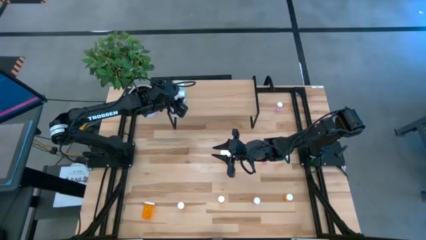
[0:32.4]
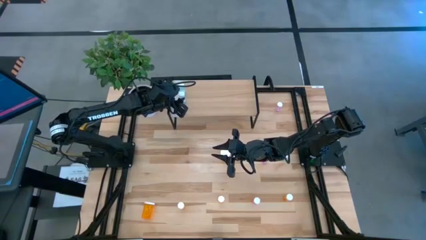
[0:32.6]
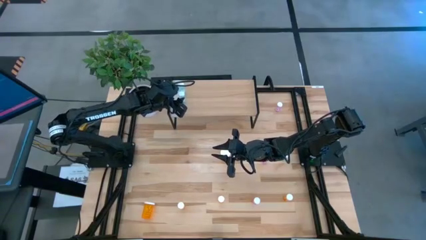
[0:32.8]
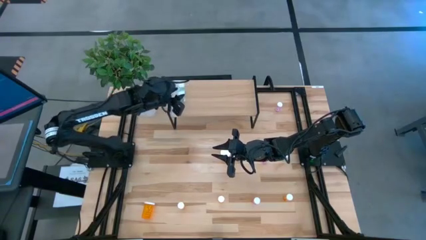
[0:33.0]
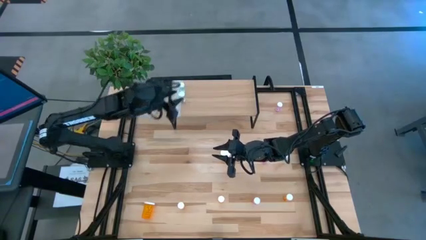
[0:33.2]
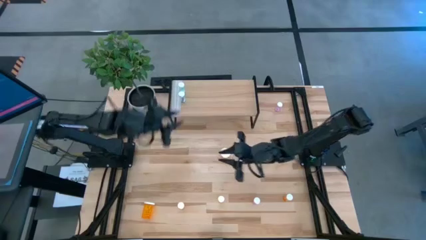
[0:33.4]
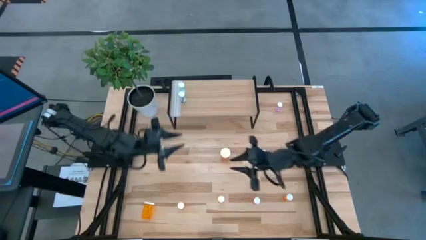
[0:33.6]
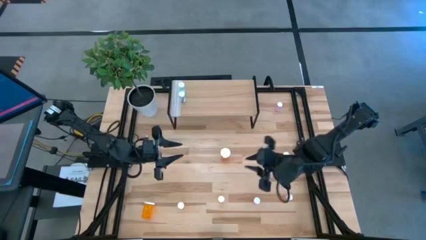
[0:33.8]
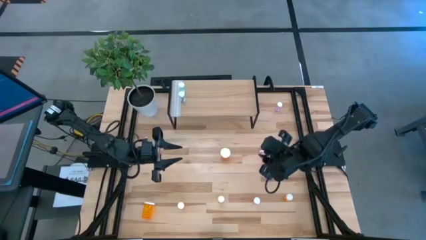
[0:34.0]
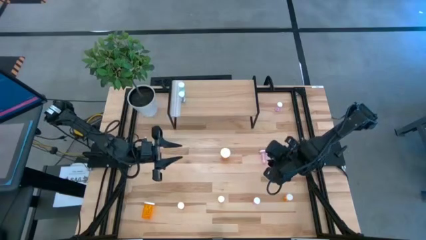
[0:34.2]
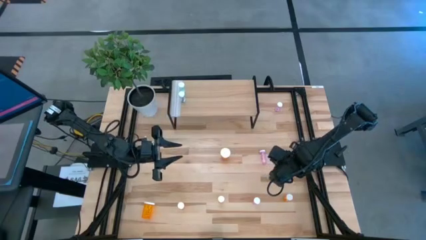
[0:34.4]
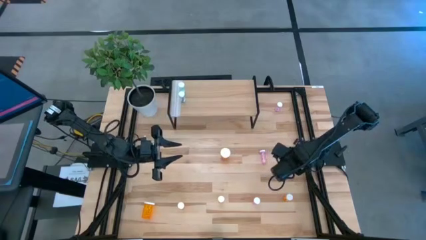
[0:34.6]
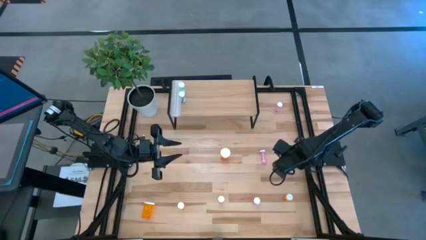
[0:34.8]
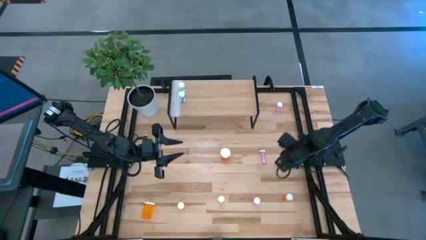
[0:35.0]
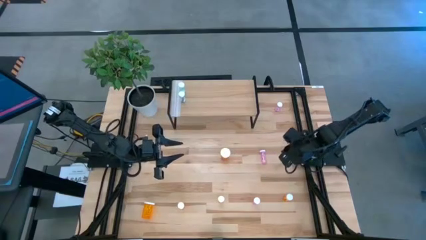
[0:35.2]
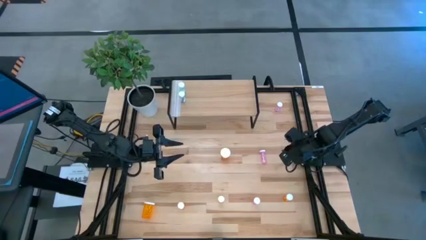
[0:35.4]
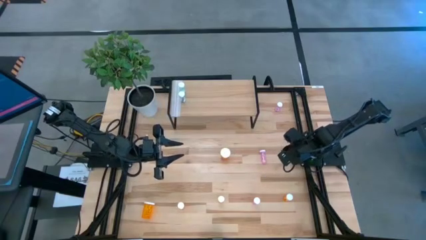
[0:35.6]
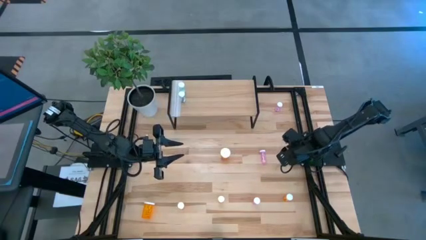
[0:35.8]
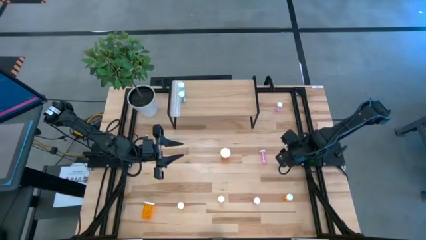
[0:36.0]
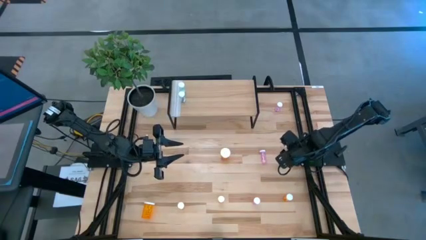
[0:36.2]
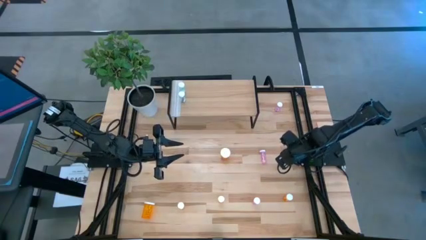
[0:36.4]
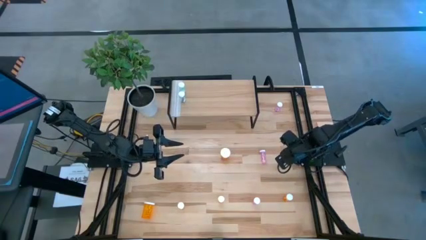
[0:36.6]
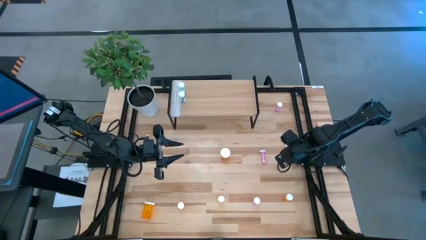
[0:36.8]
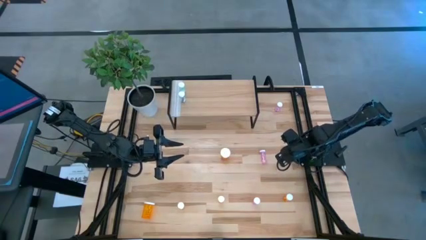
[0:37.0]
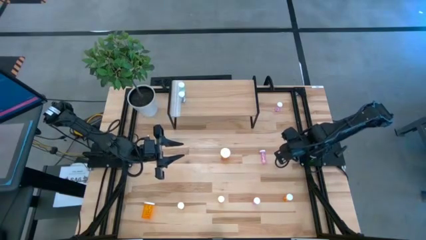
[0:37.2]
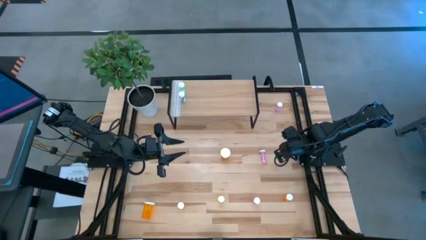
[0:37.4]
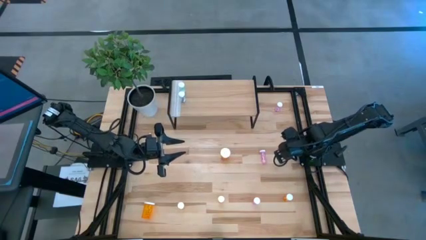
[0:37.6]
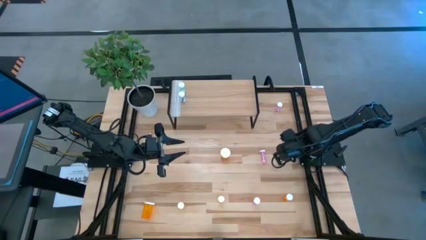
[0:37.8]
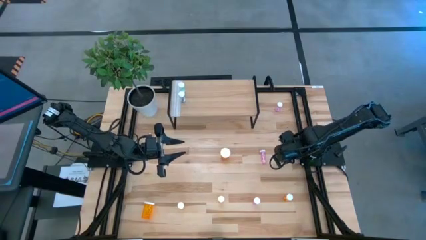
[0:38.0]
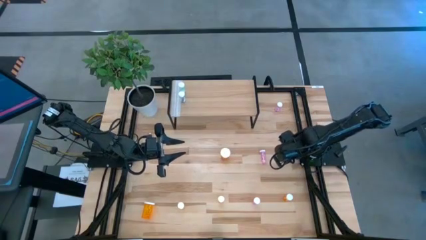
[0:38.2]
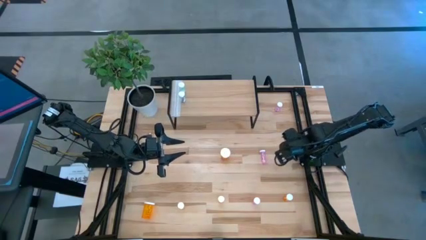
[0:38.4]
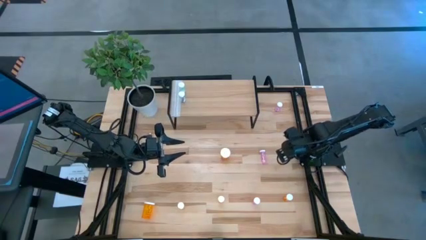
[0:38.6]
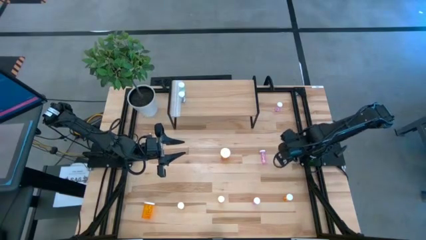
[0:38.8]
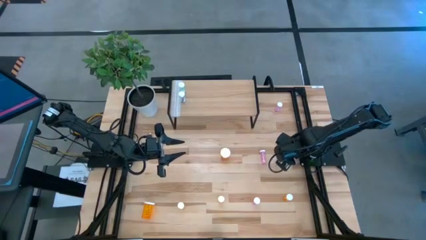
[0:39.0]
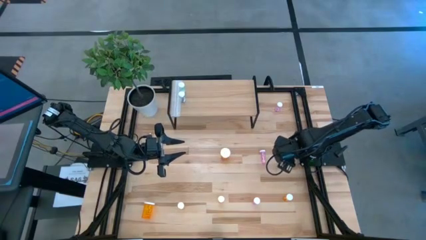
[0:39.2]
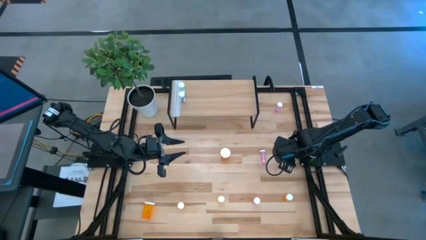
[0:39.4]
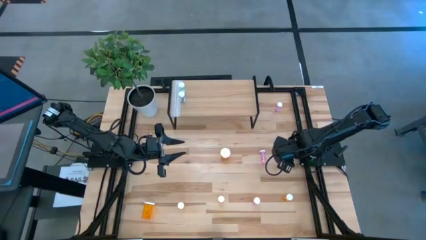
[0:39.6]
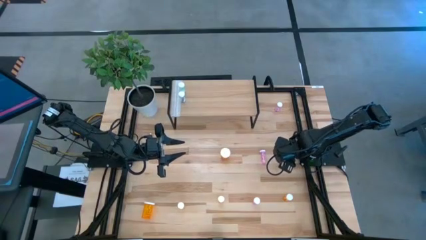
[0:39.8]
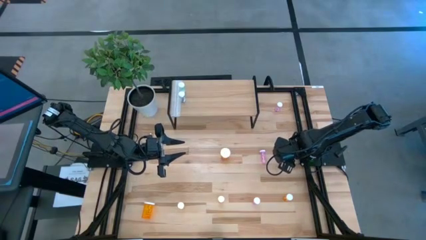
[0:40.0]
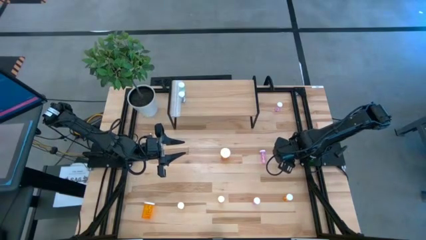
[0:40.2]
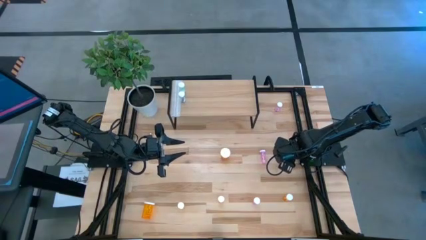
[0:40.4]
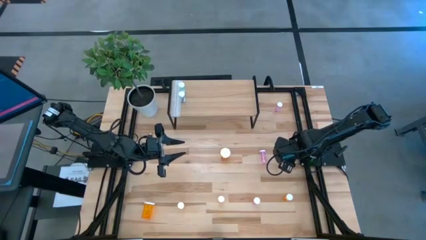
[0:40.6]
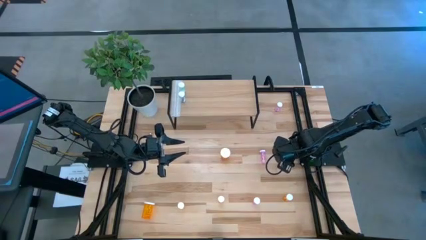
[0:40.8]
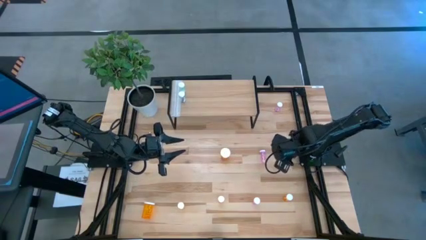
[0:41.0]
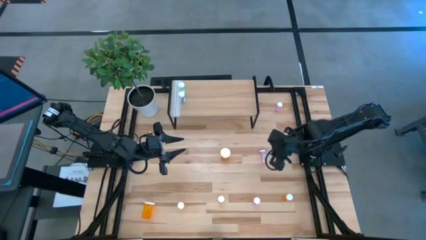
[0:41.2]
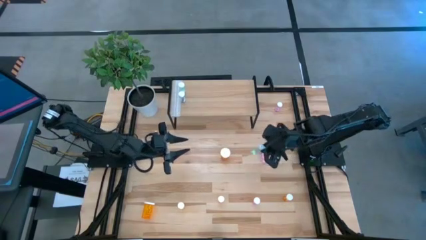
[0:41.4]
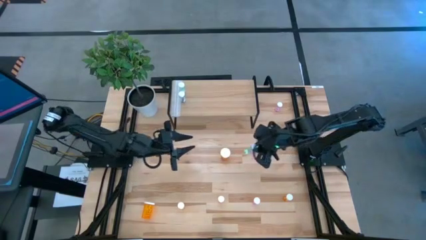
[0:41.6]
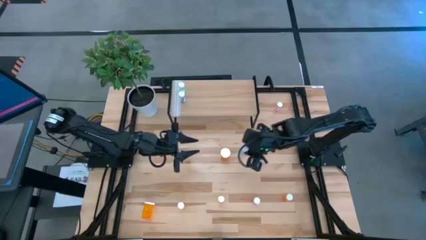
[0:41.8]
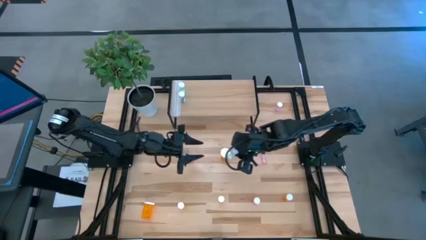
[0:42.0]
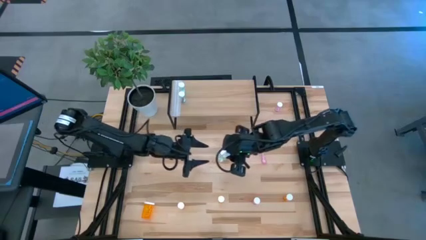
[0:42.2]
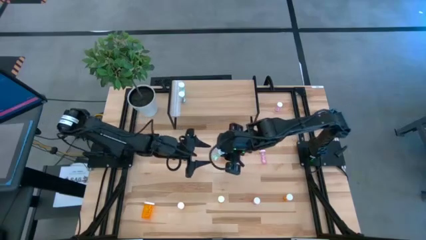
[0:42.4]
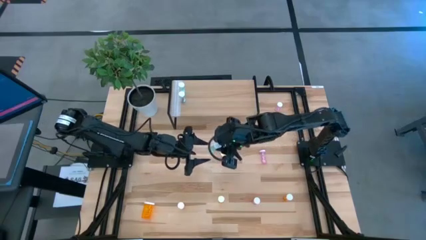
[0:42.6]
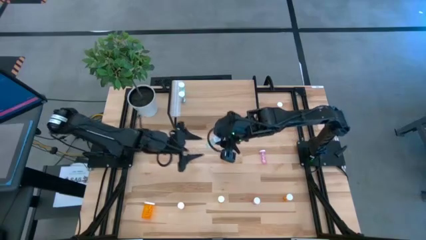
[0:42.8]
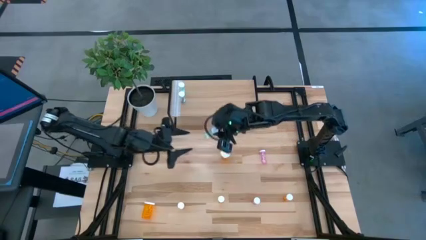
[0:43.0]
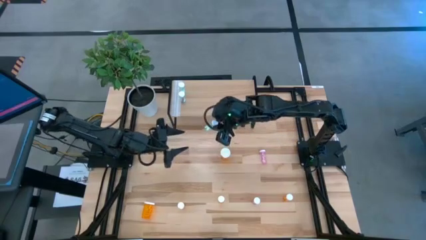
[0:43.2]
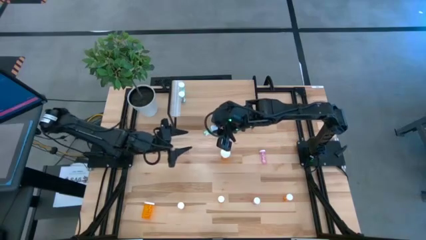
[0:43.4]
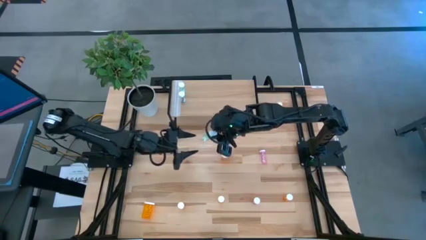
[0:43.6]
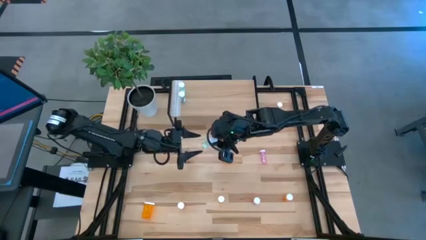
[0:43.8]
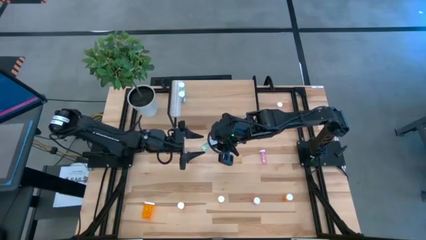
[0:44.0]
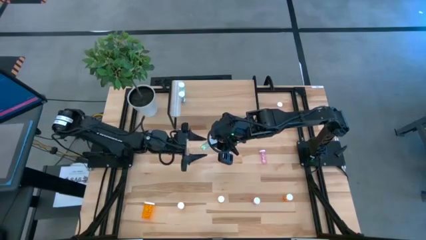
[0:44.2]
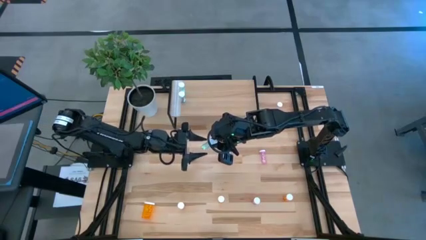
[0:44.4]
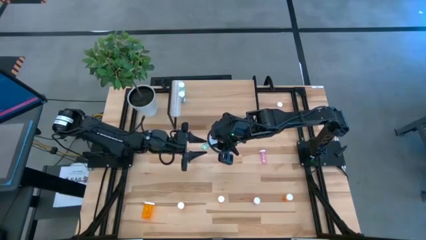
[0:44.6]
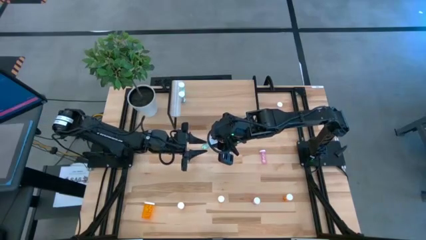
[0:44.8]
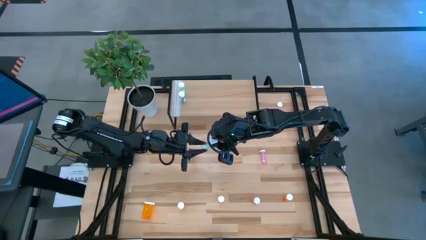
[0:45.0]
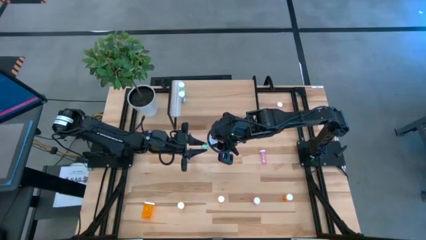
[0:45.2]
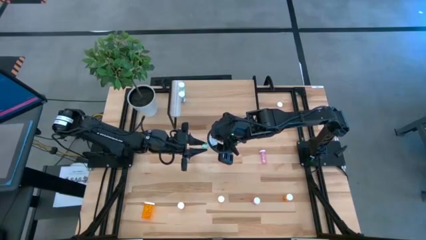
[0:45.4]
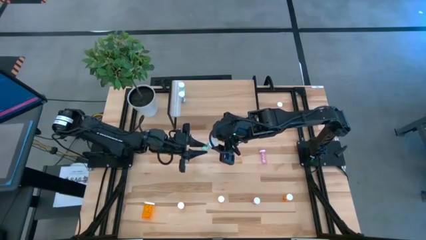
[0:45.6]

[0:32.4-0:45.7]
Task: Pick and place medicine bottles onto shelf by color
Put the blue pill bottle on the shelf aligned with the other blue pill bottles
